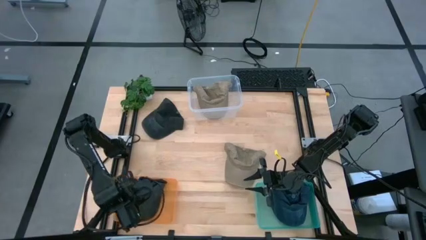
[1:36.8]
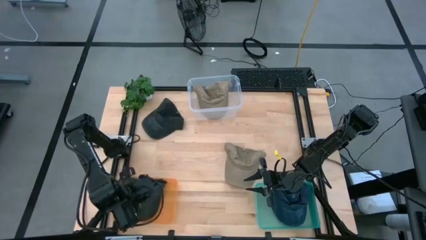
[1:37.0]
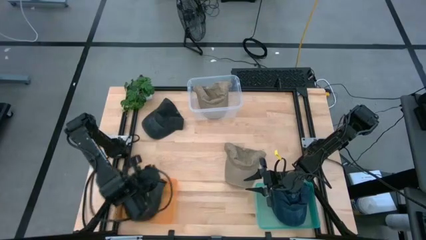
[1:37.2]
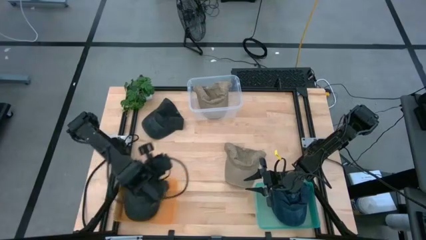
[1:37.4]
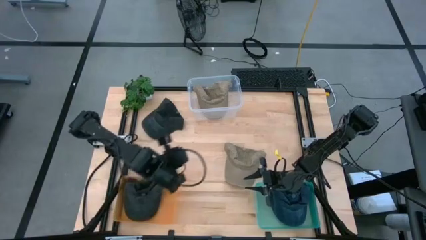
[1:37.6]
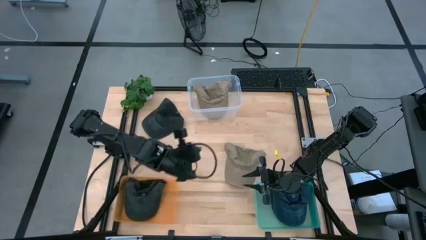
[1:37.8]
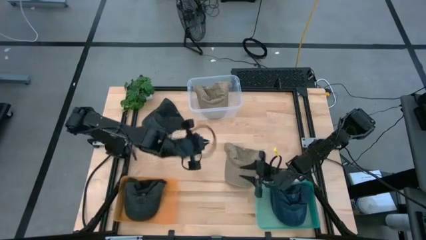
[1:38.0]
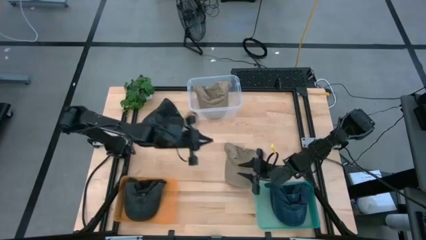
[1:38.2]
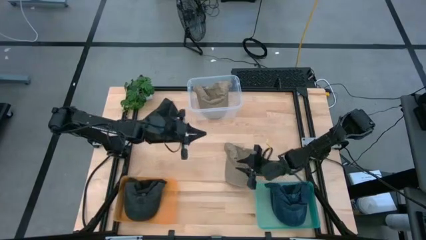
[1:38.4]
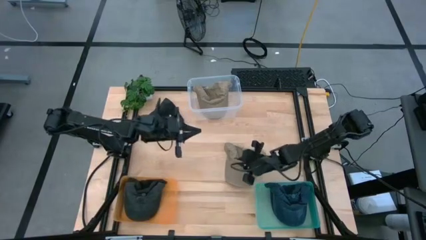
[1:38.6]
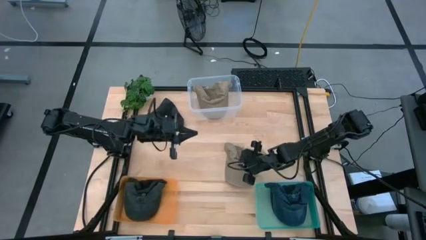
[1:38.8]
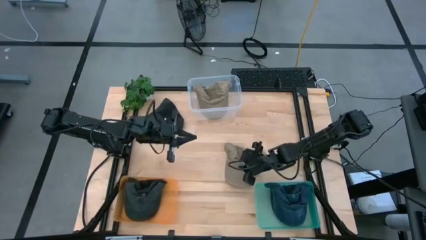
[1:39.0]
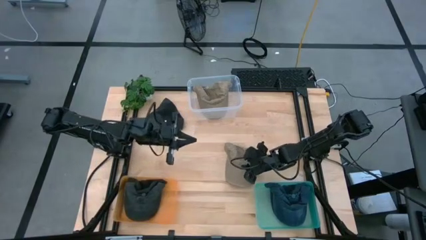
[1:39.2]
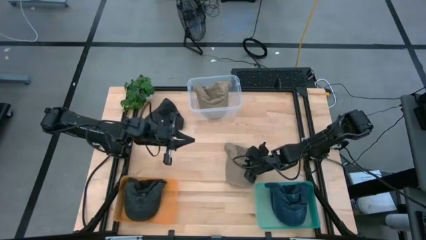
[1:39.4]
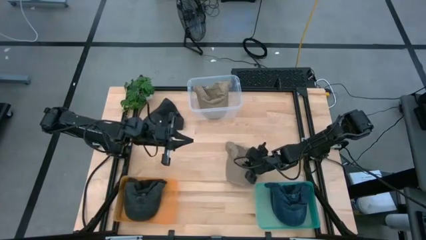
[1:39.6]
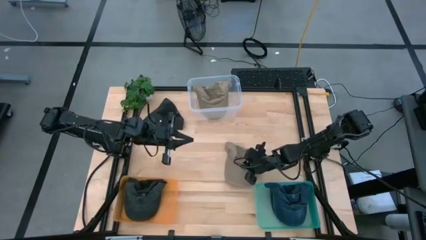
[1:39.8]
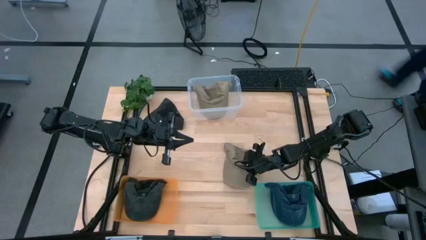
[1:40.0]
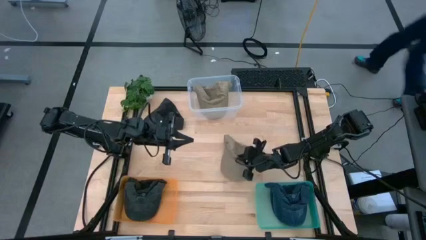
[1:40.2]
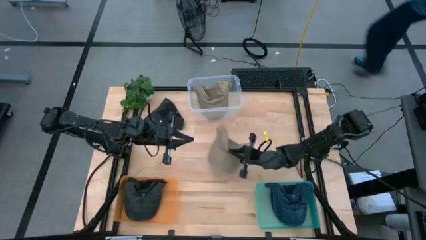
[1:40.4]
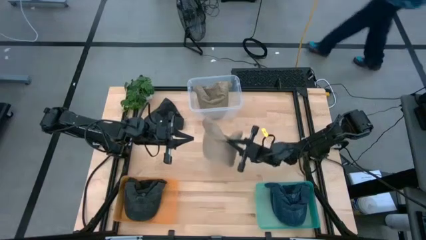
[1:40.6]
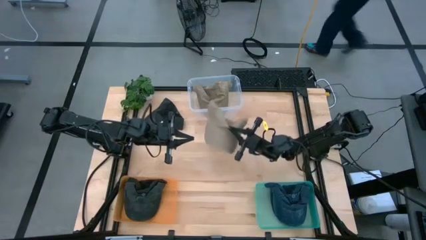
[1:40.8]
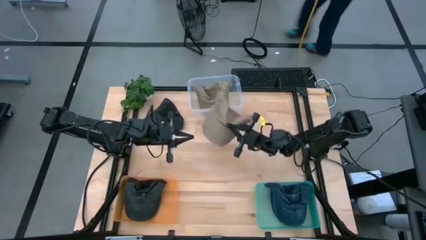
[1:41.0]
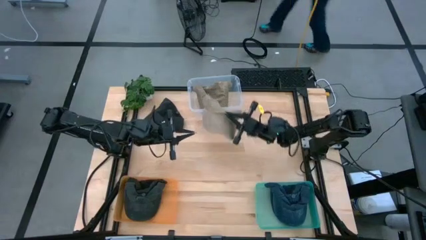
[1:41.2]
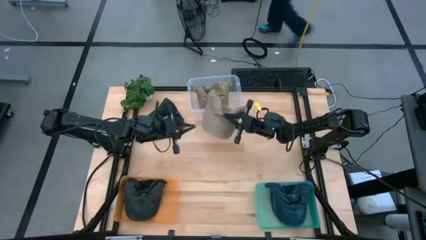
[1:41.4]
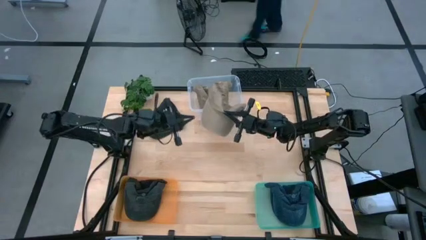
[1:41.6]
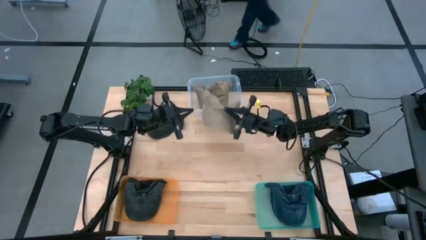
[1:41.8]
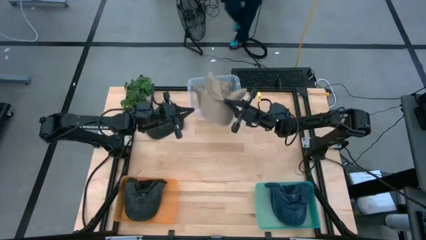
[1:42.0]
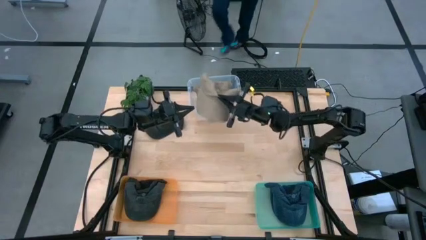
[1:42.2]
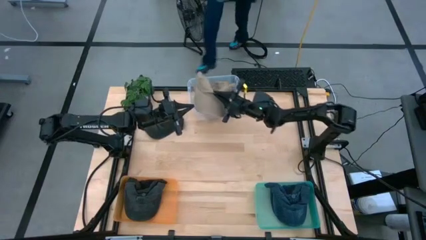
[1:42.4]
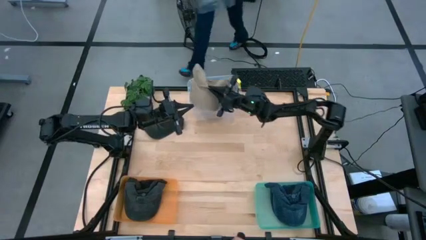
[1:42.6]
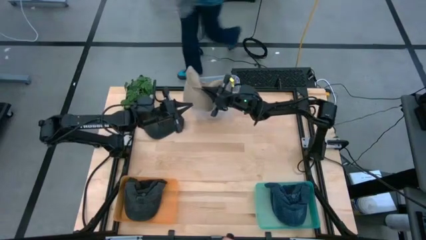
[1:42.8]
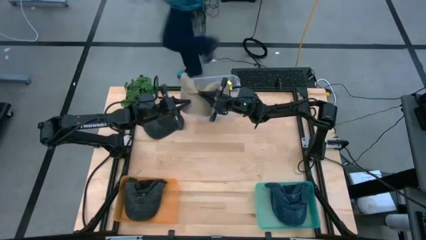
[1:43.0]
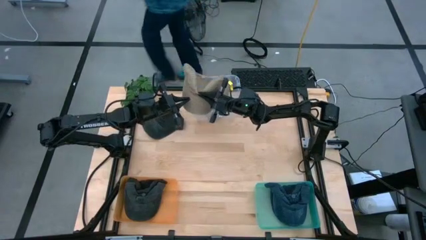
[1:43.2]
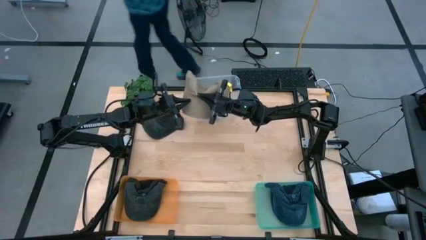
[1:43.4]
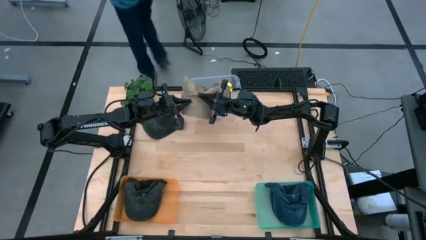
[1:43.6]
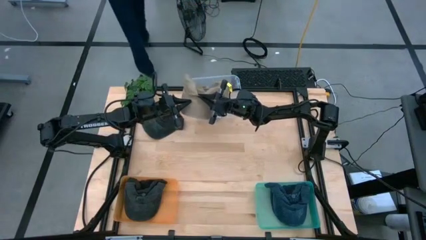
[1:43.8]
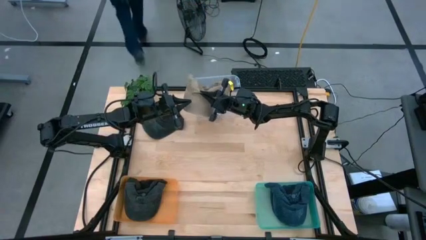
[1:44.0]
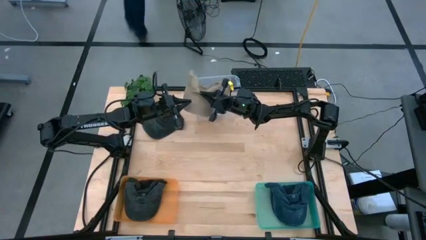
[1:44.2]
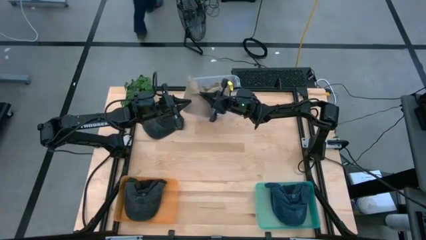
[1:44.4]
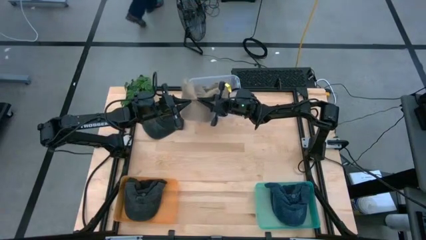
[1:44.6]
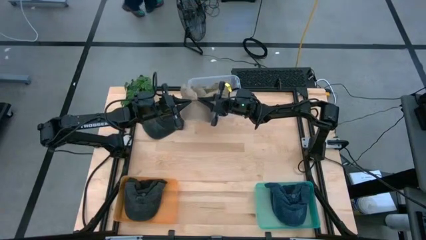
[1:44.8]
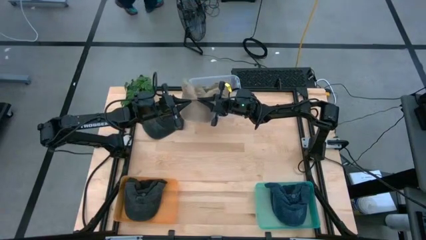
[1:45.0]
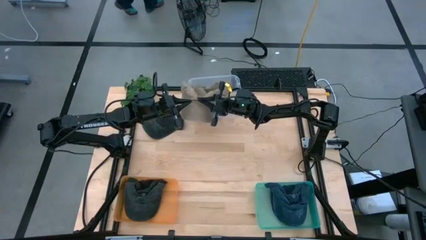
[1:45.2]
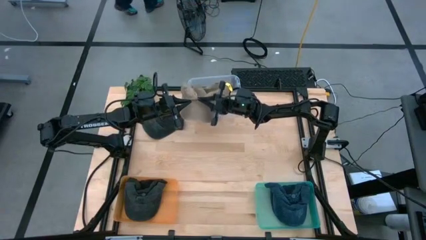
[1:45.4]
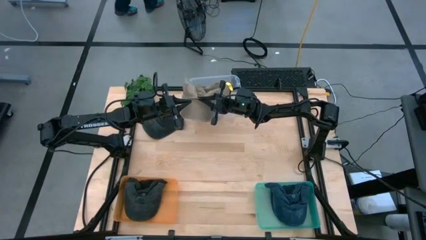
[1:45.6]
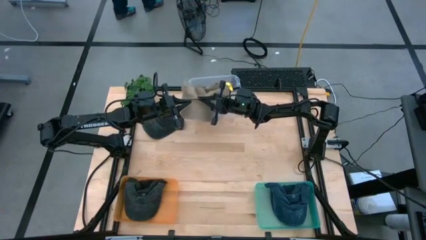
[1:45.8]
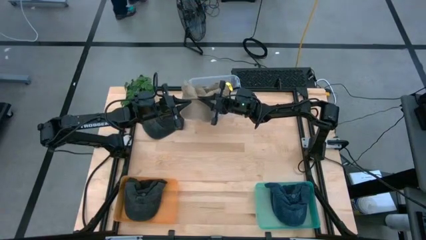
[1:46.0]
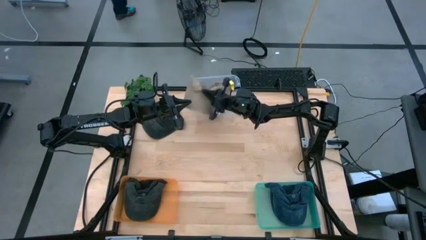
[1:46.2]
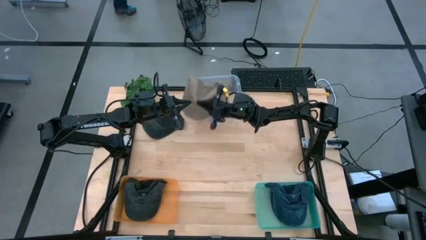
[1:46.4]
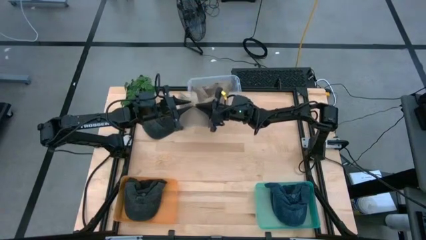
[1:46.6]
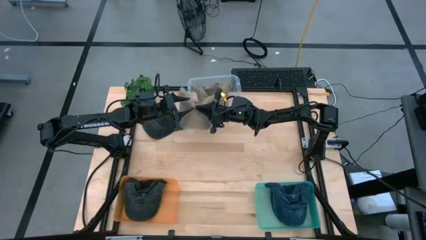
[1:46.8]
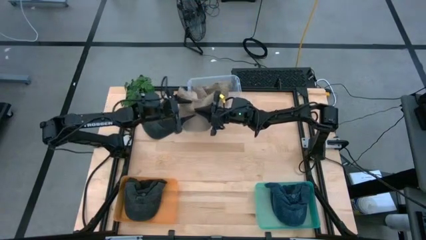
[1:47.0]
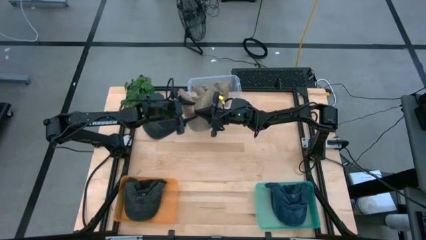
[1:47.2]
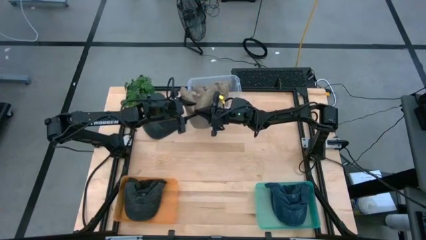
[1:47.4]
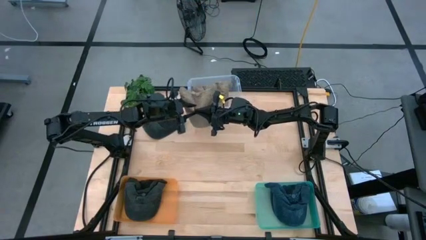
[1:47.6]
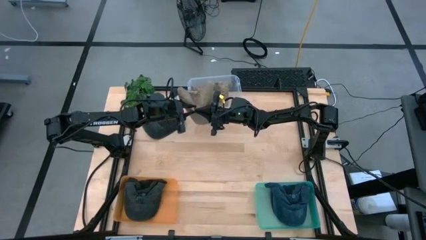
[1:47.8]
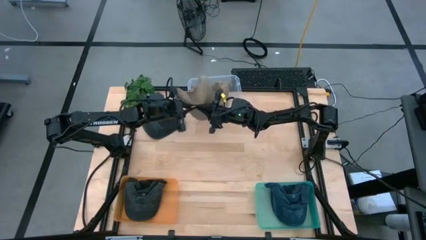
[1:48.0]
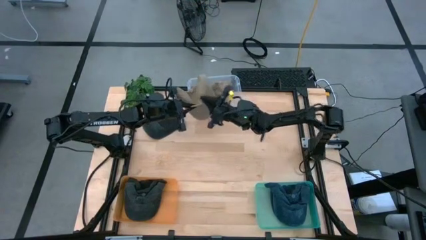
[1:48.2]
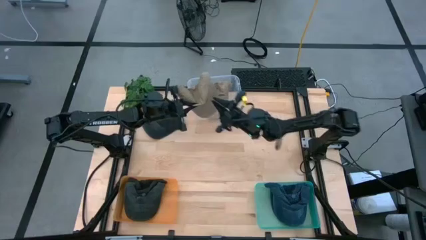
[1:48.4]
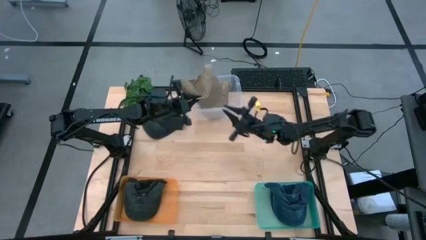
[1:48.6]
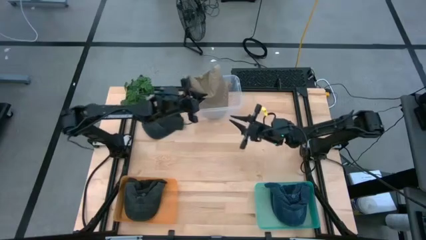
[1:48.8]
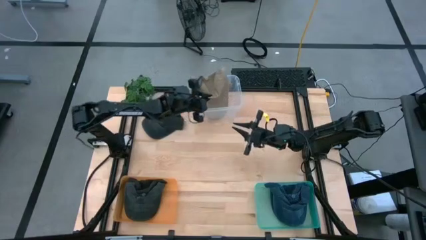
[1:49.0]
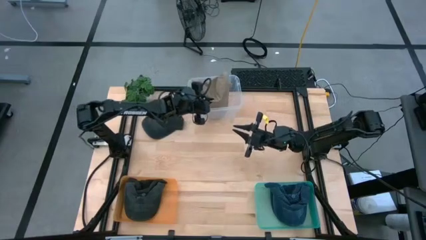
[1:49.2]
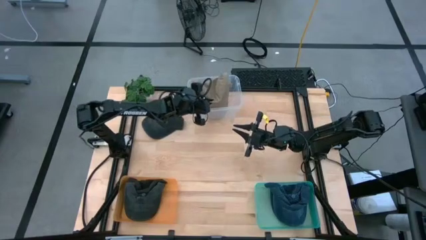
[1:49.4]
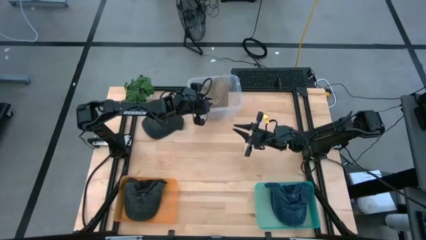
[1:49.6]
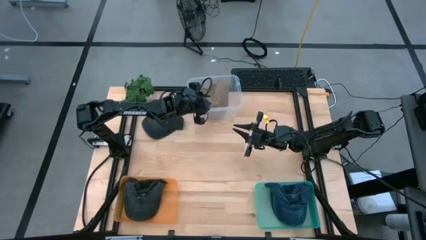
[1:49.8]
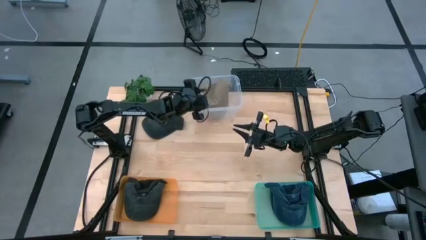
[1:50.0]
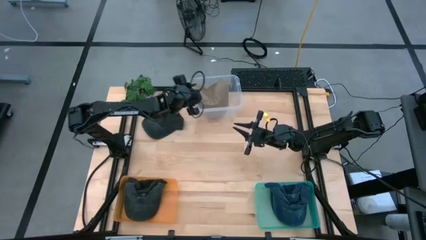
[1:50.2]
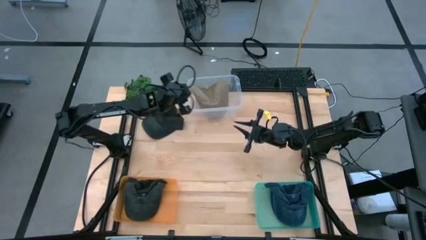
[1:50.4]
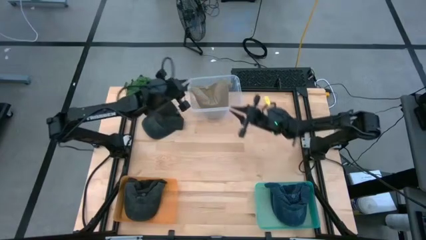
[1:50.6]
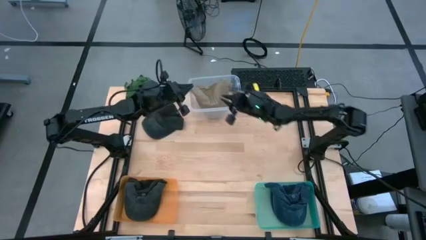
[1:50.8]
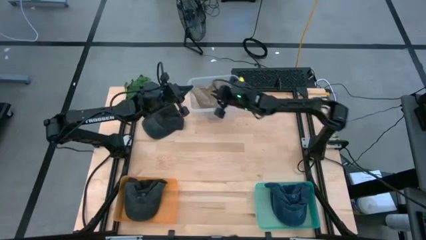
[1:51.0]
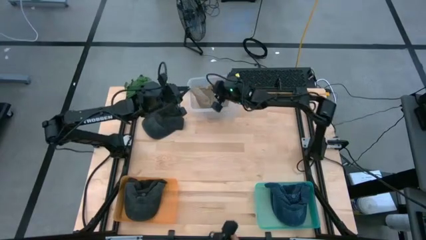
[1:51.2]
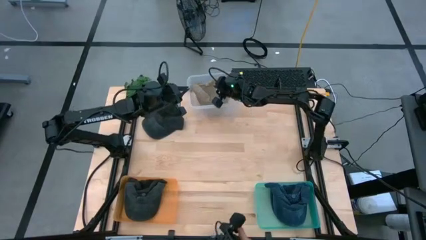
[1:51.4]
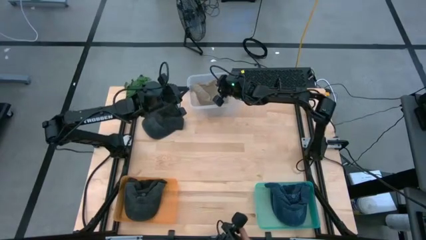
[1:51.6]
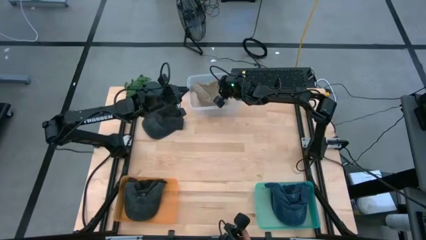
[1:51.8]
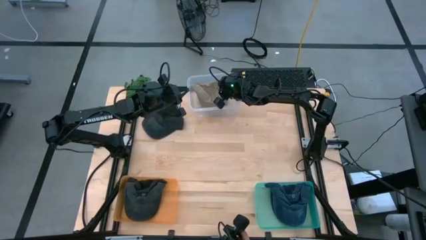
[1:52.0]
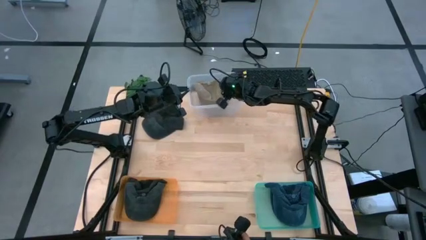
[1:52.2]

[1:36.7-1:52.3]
Task: Pick & Place hat
Put the brown cap into the transparent bin

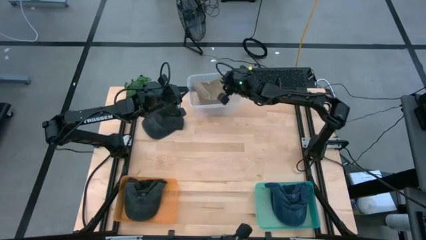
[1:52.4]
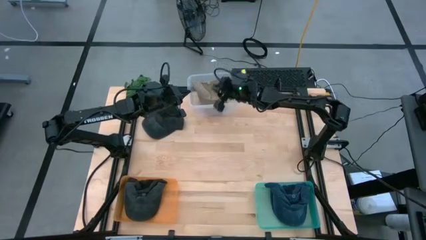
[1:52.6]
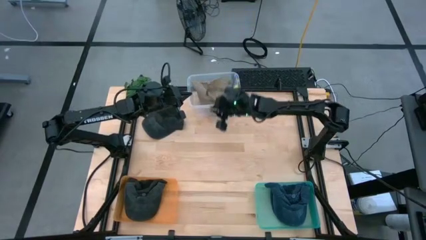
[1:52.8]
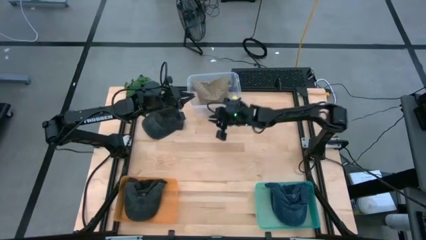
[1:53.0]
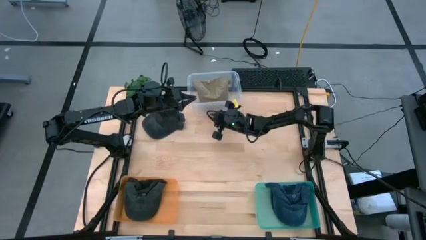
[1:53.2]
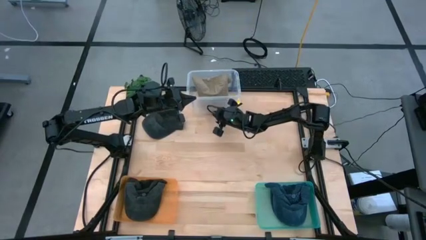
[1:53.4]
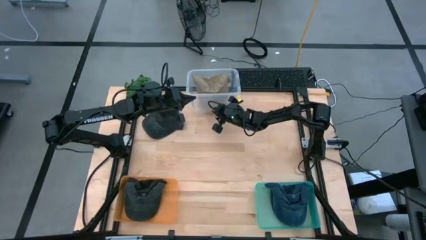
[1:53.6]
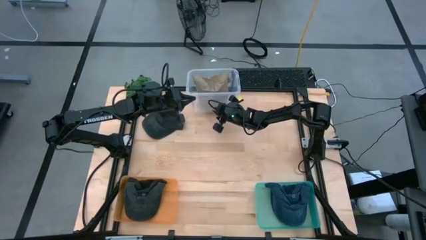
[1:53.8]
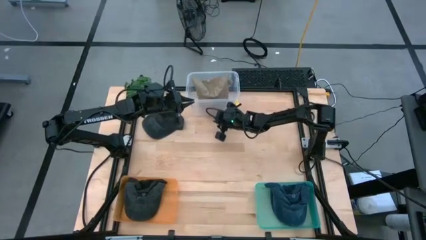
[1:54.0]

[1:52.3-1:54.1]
Adjust the transparent bin
